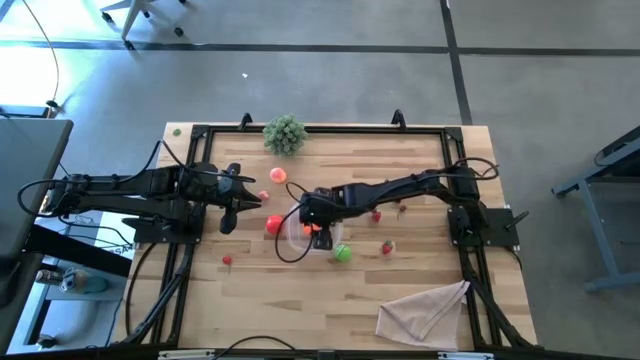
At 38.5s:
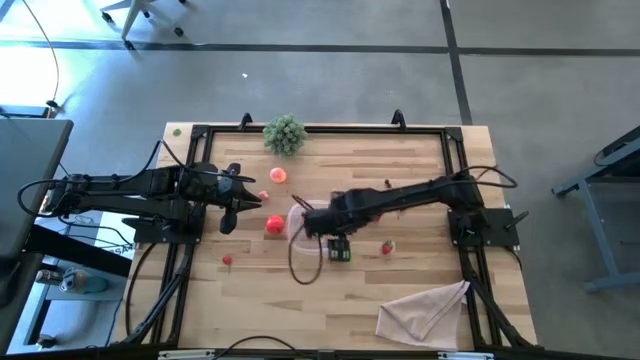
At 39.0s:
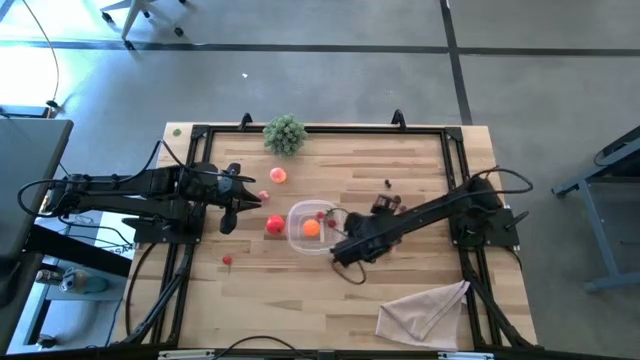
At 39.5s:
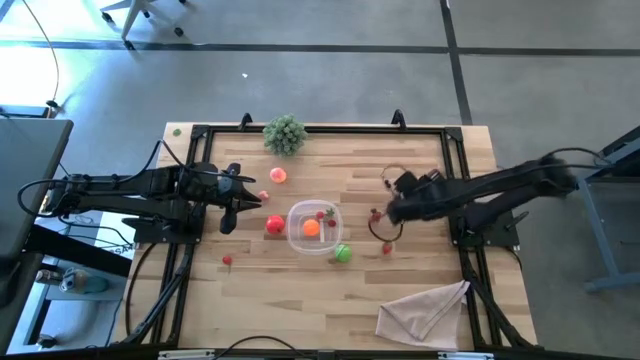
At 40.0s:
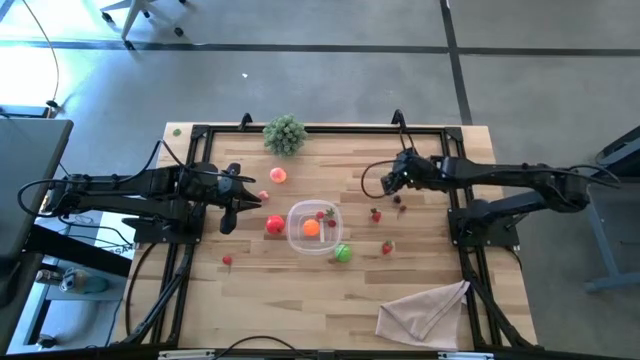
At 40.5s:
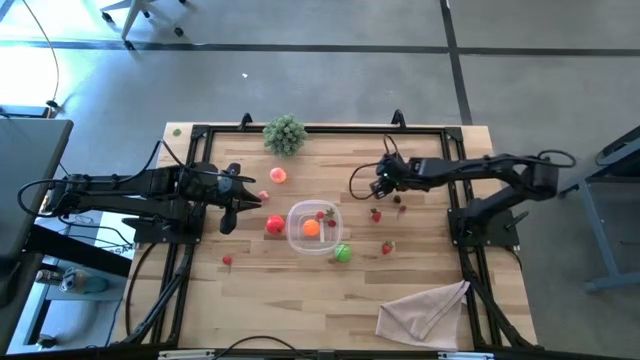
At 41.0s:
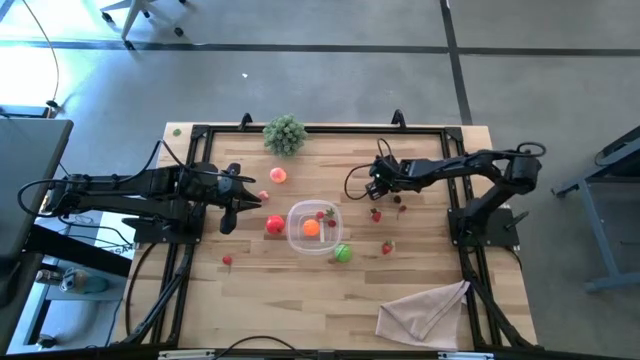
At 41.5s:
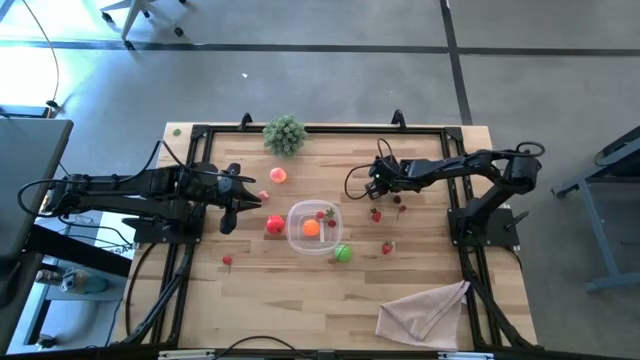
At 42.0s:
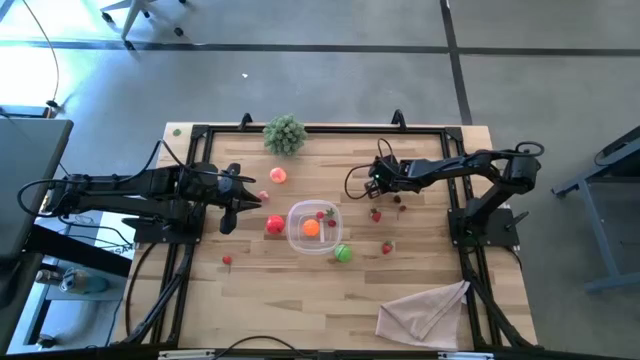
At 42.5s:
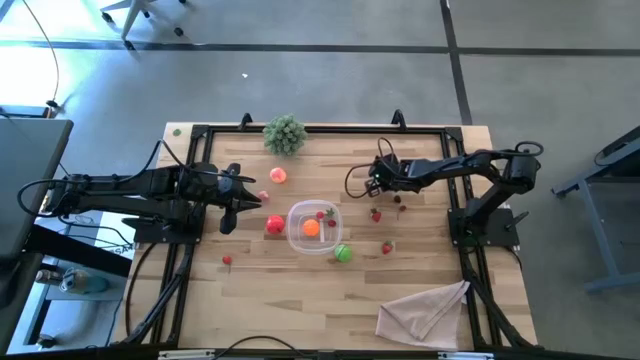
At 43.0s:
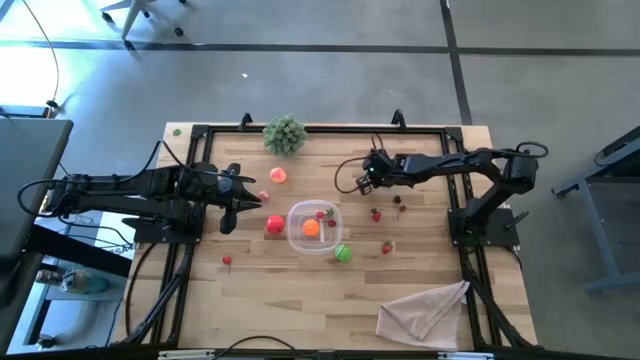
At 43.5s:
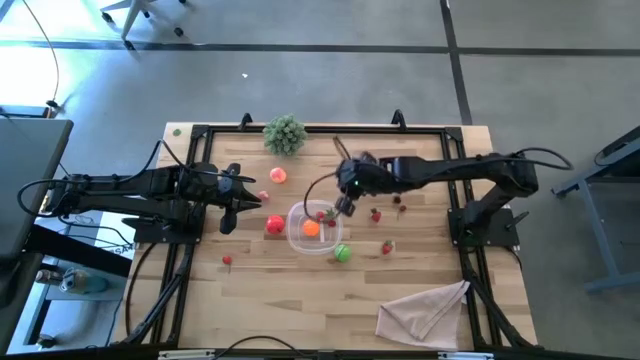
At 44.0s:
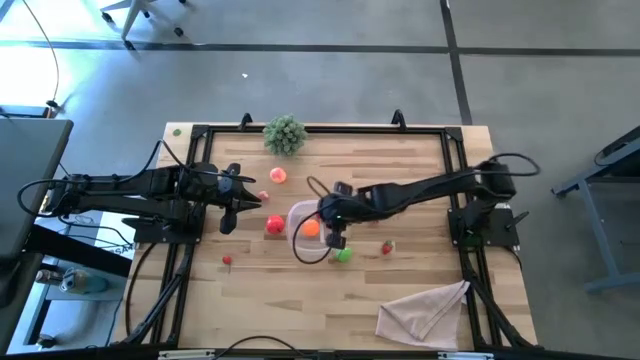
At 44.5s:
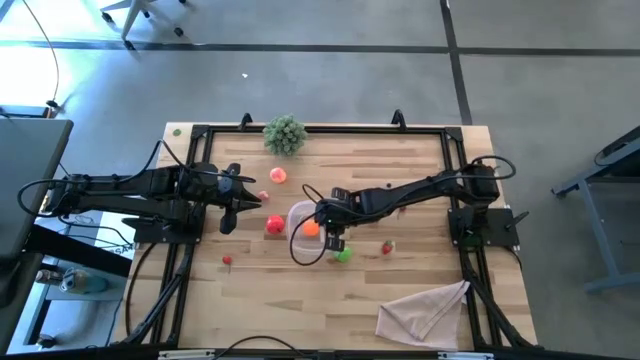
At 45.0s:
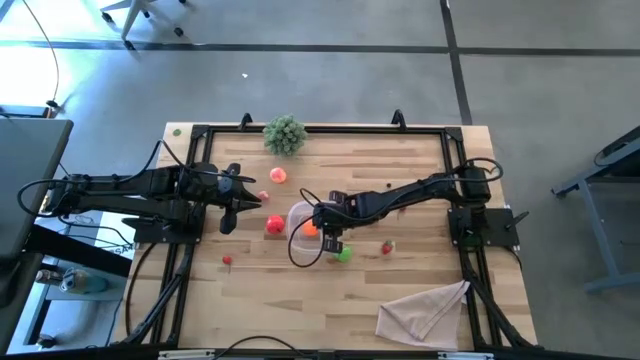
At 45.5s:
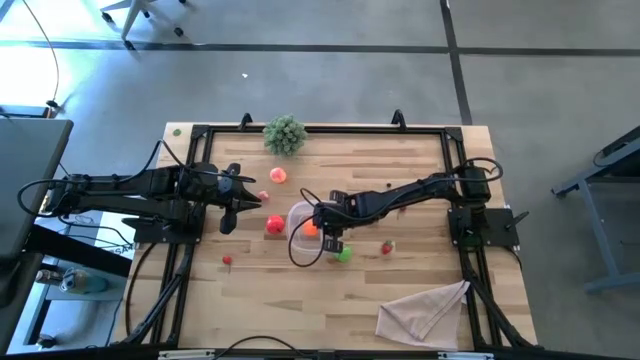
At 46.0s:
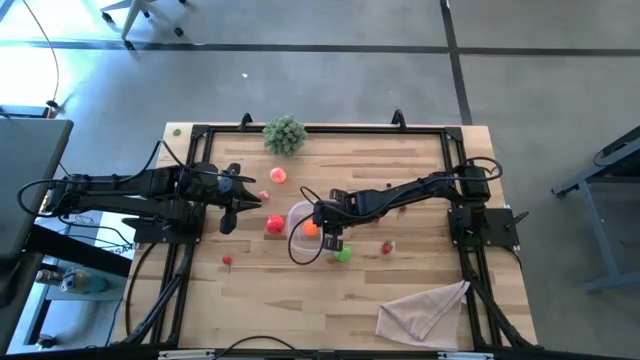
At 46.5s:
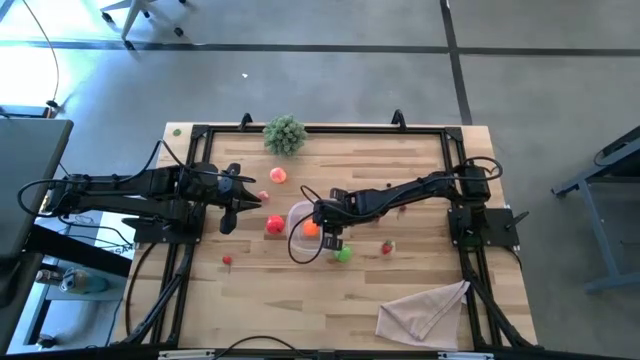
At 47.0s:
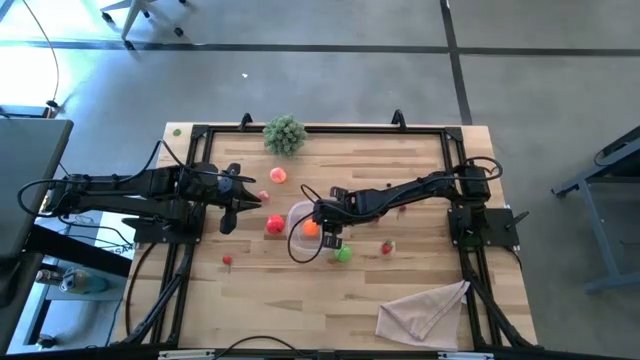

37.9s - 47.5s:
Task: Pick and placing Produce into tupperware
Put the top blueberry into the transparent bin

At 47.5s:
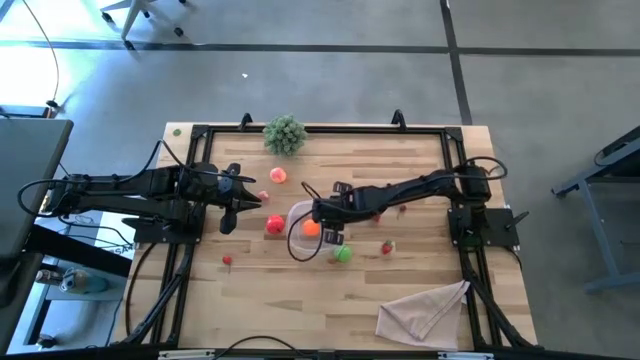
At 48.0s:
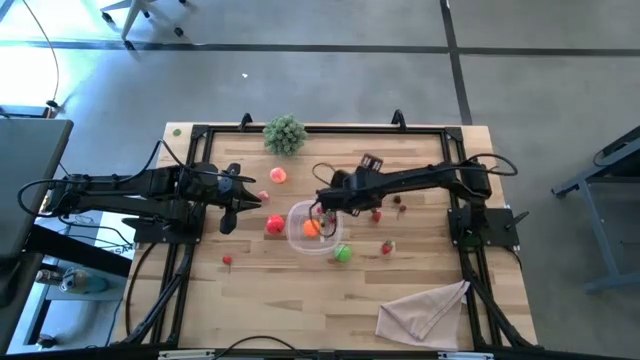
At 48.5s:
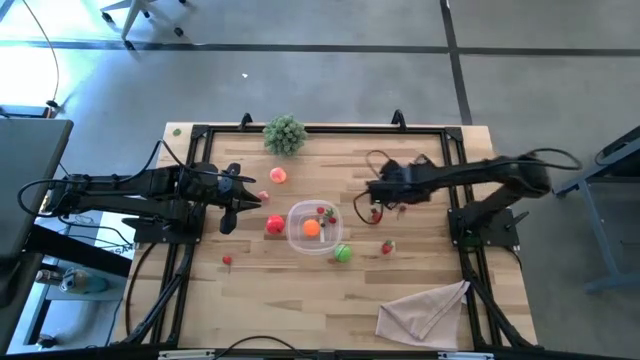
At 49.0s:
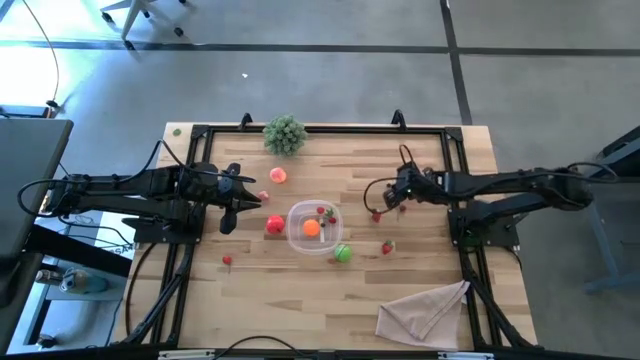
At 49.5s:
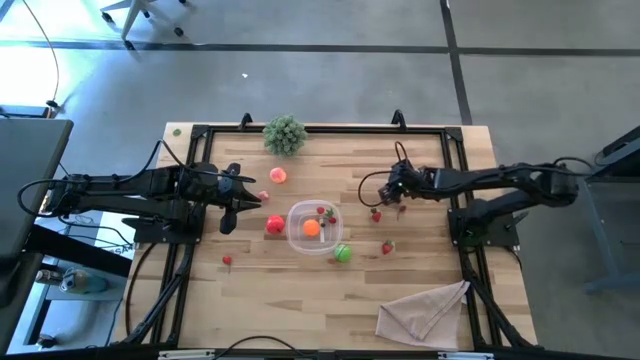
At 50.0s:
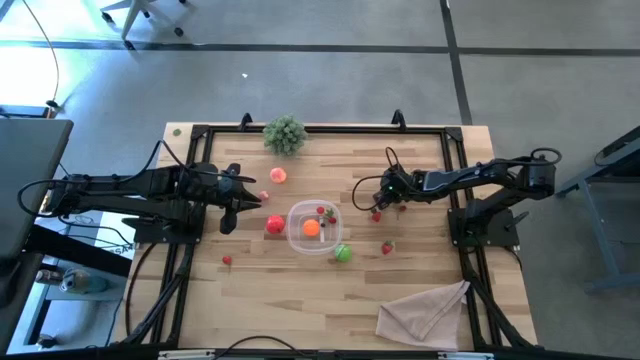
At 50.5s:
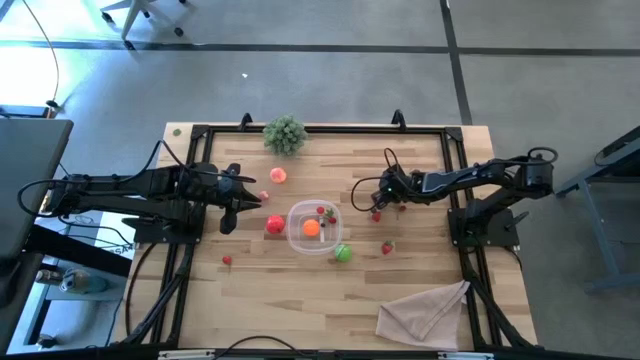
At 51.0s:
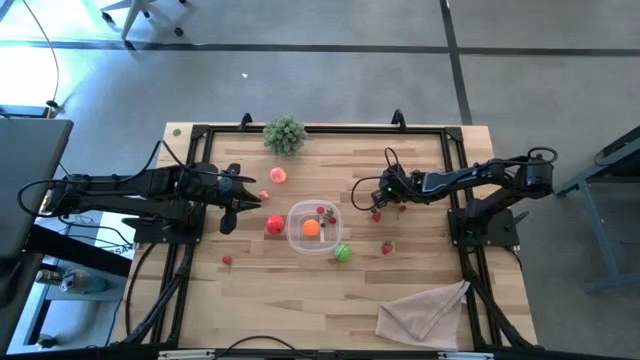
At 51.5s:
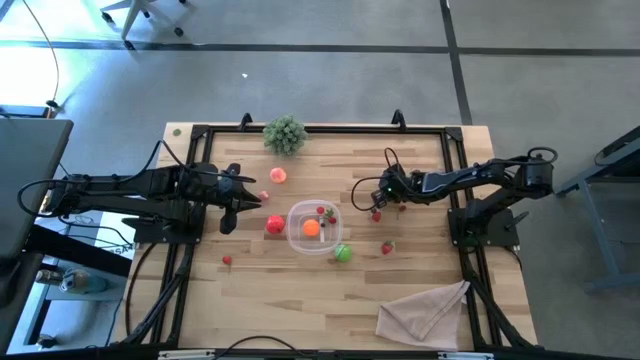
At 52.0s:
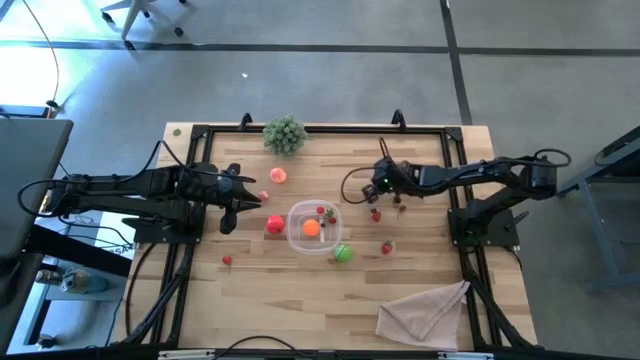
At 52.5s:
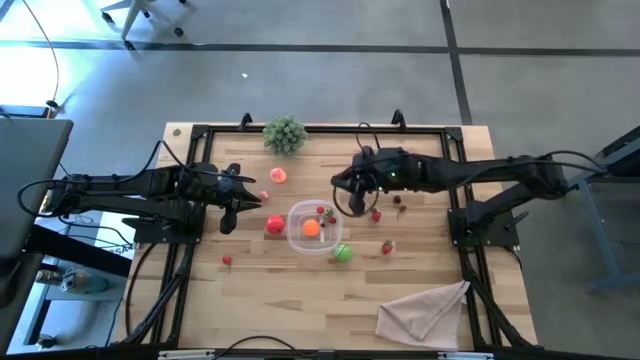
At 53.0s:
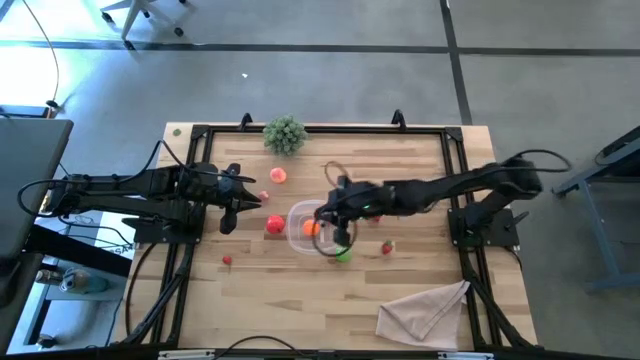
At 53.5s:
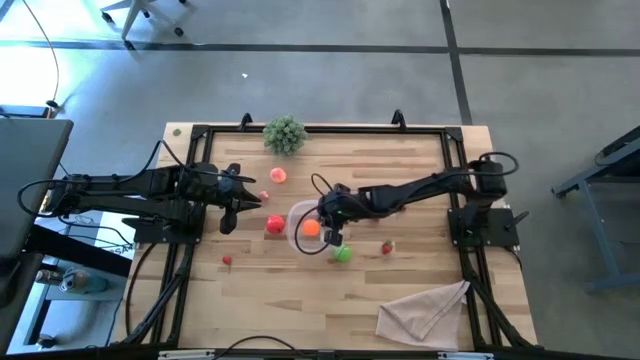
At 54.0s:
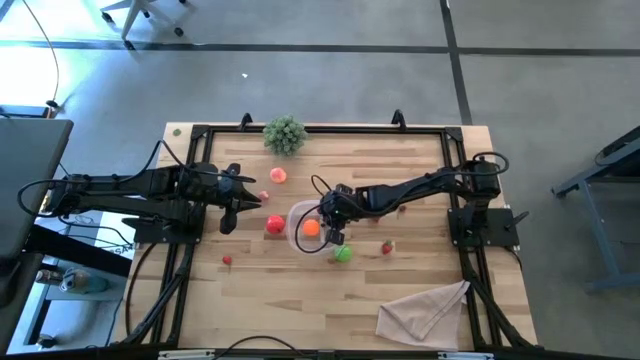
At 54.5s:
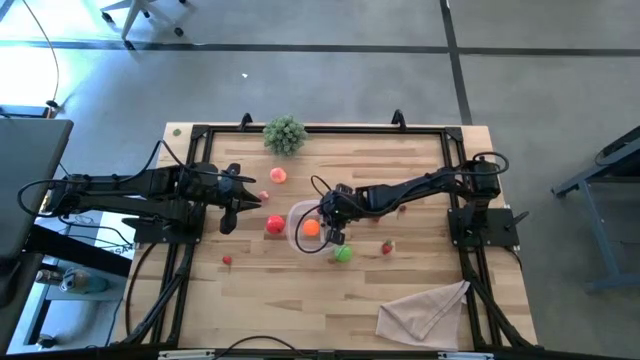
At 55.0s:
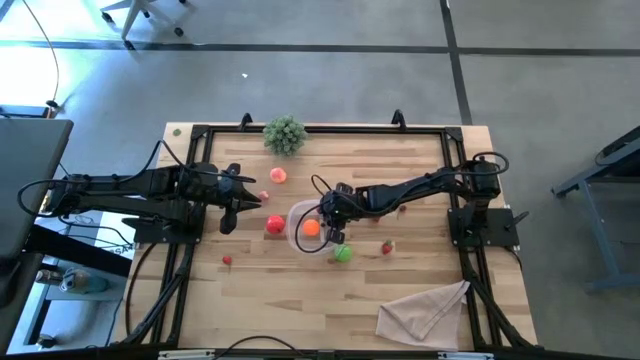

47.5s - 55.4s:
Put the blueberry into the transparent bin

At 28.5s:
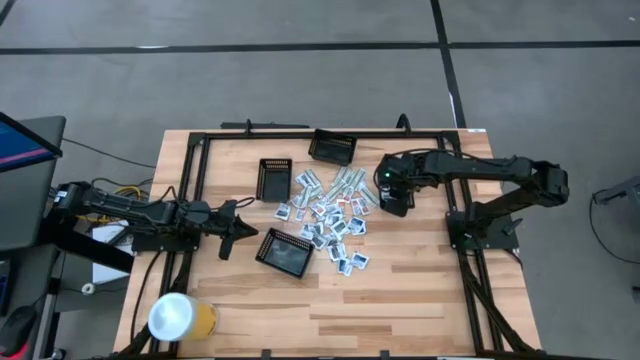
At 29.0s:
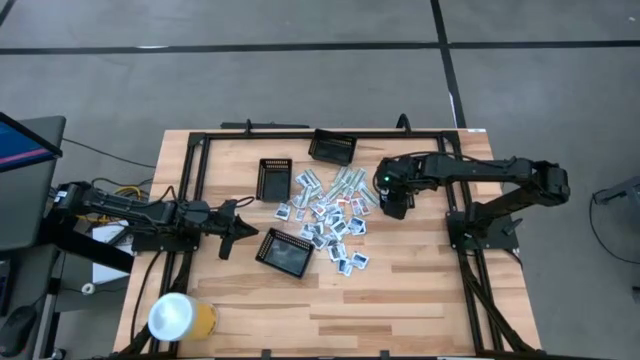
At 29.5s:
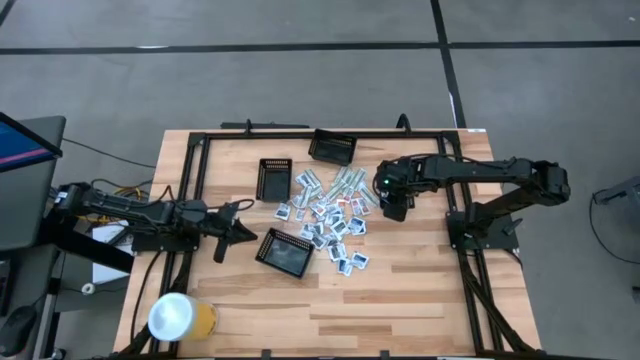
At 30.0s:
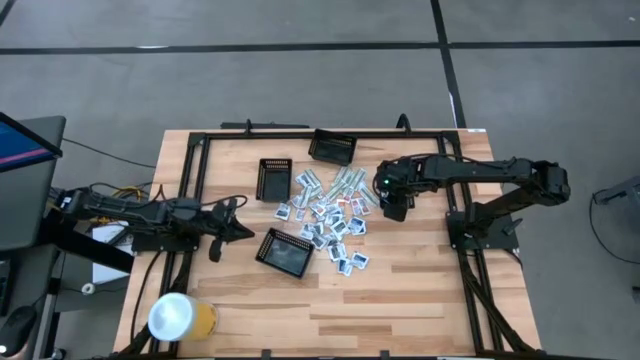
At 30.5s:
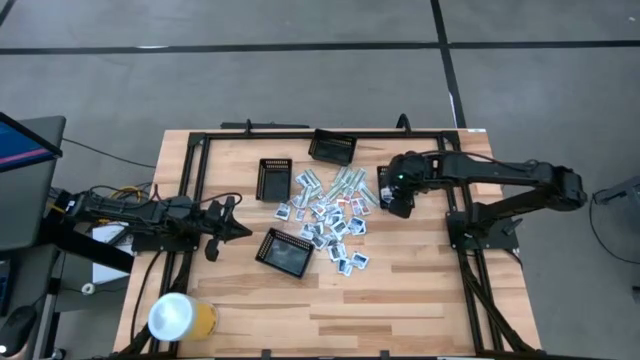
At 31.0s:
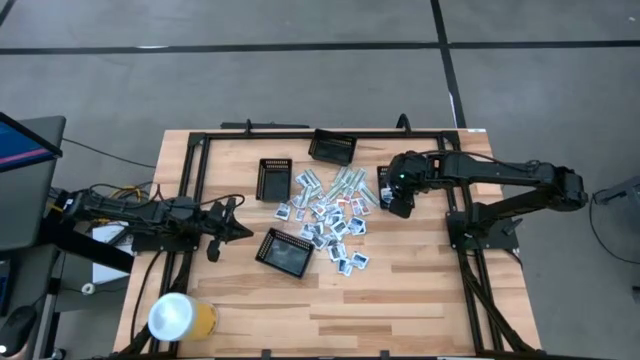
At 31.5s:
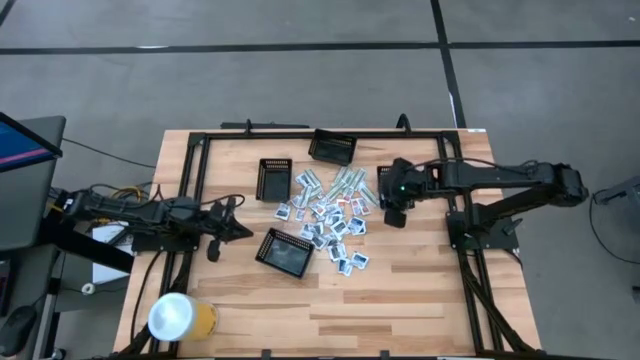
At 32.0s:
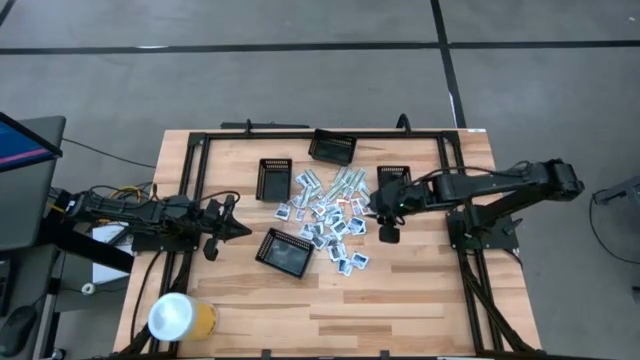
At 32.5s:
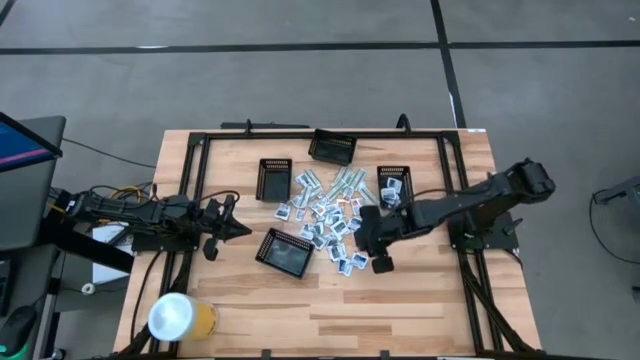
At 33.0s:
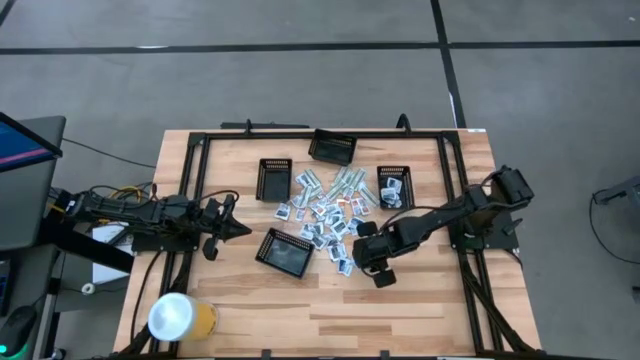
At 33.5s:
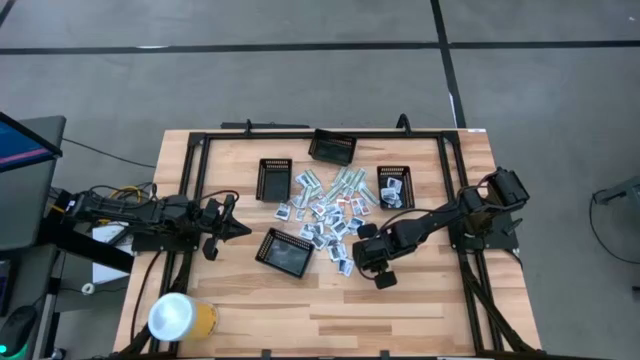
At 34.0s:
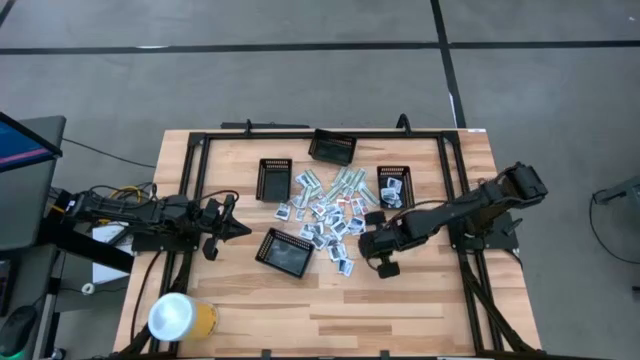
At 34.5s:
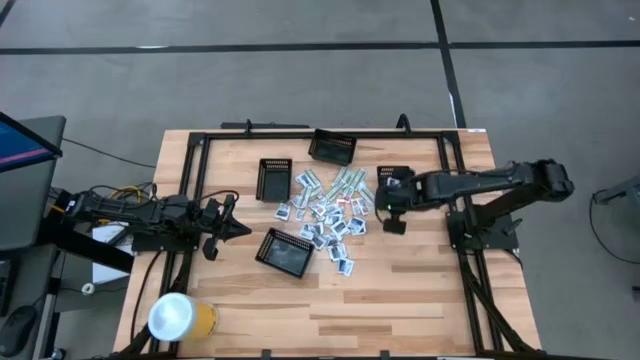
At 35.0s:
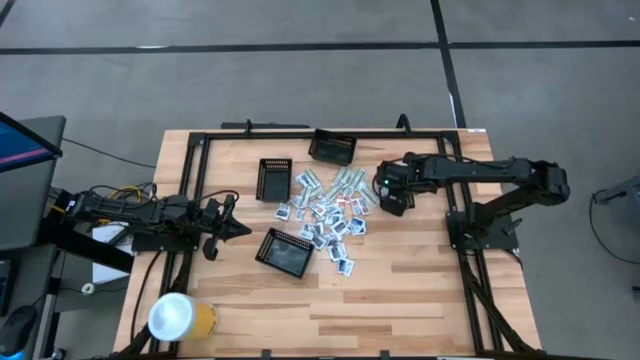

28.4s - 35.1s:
Task: Pick & Place First Aid Supplies
Put the white alcohol pad into the right black bin
